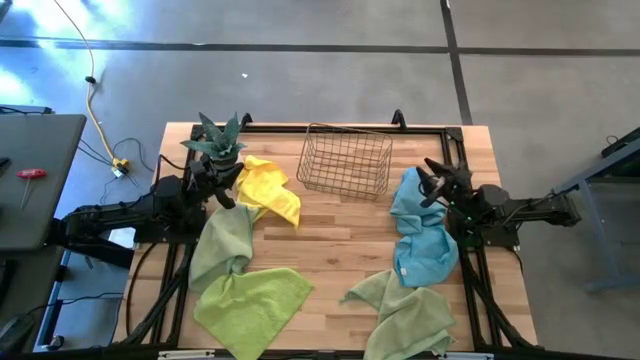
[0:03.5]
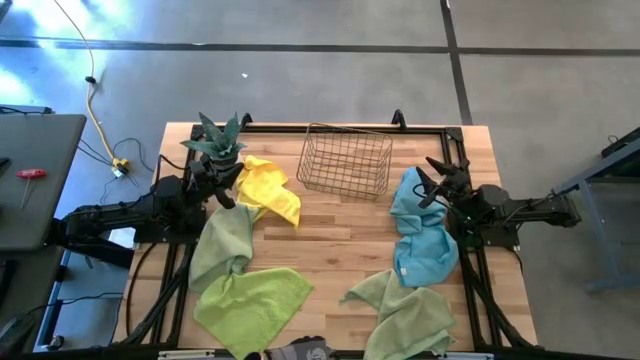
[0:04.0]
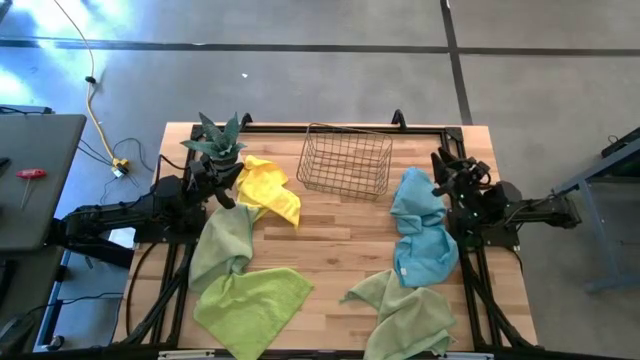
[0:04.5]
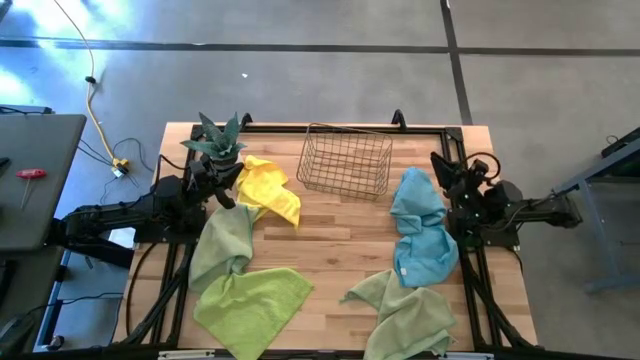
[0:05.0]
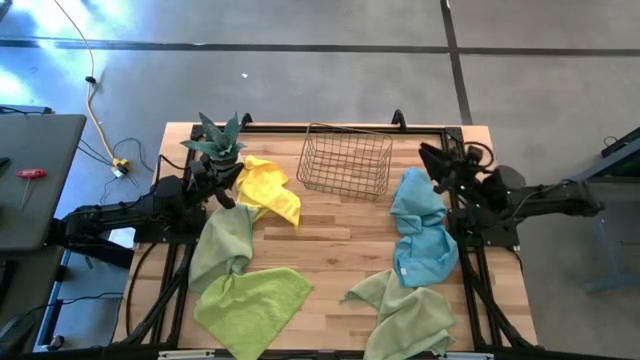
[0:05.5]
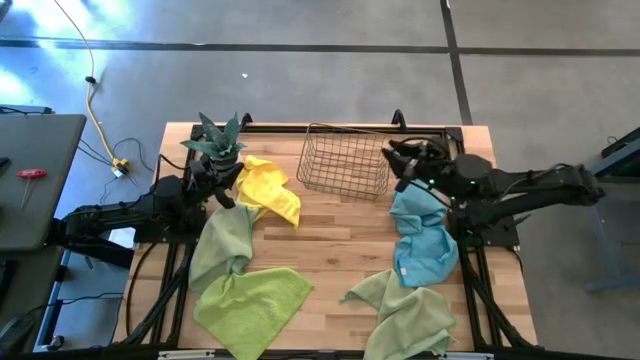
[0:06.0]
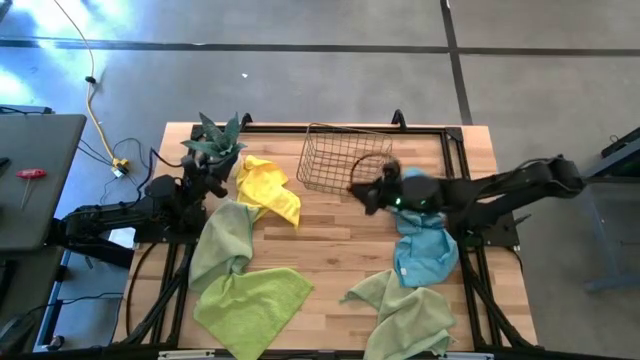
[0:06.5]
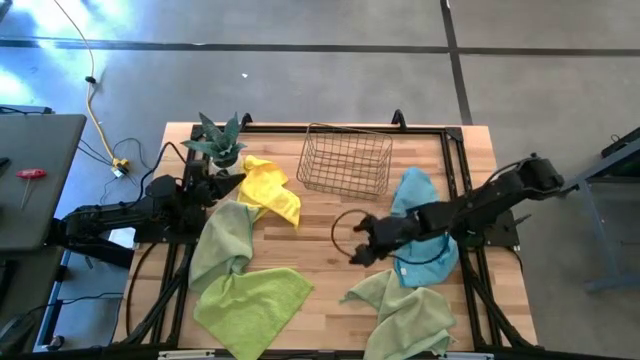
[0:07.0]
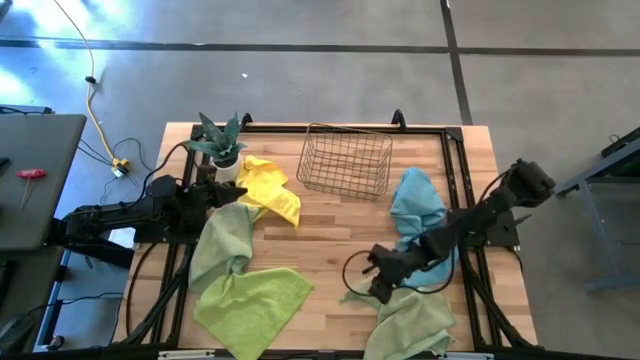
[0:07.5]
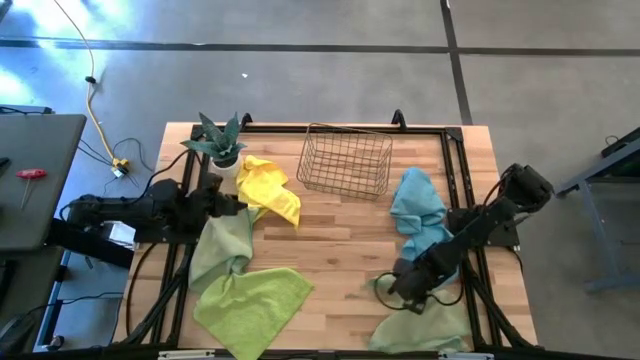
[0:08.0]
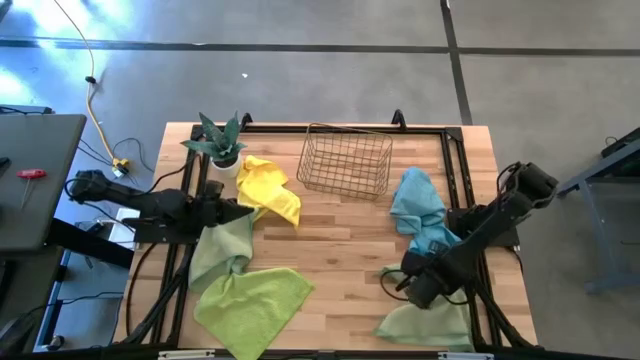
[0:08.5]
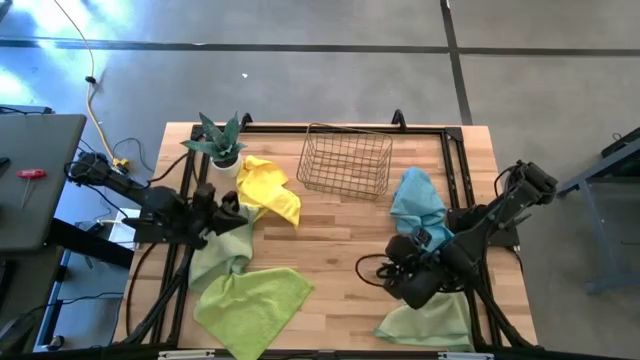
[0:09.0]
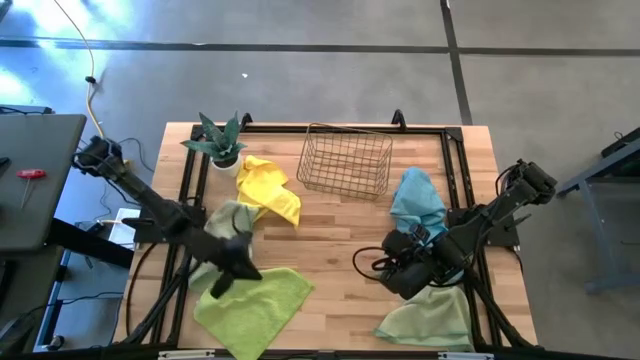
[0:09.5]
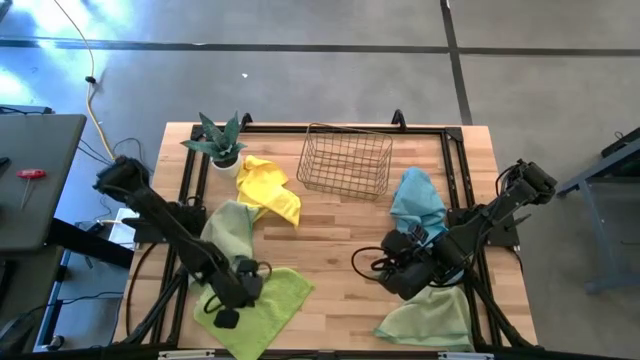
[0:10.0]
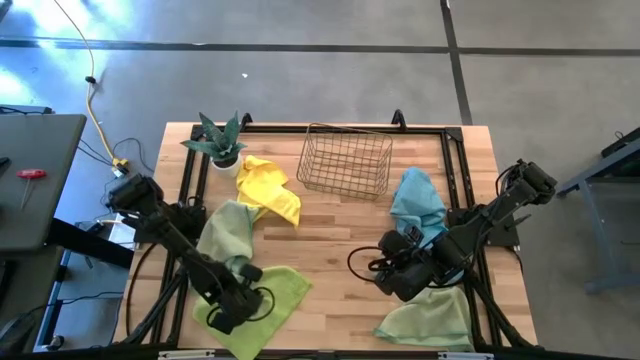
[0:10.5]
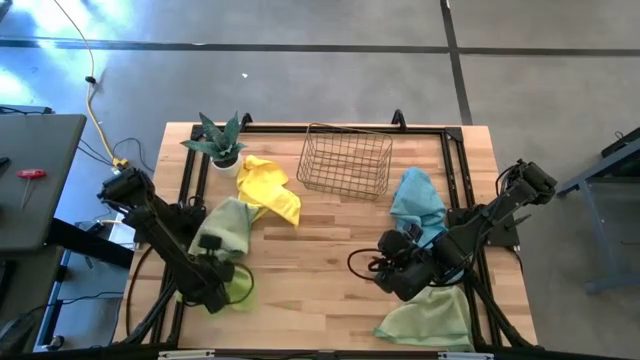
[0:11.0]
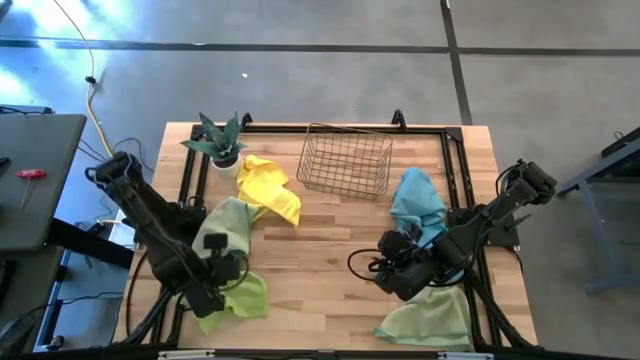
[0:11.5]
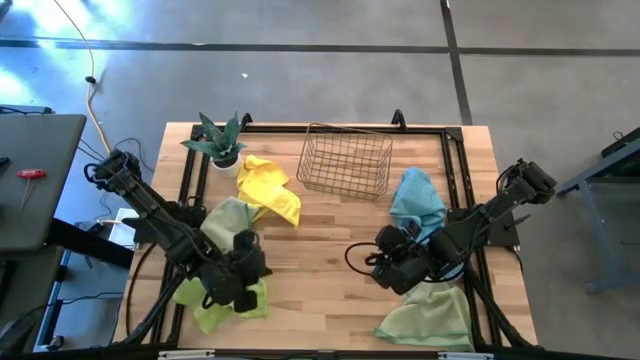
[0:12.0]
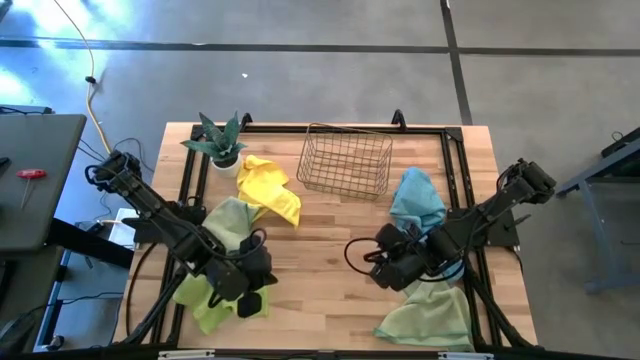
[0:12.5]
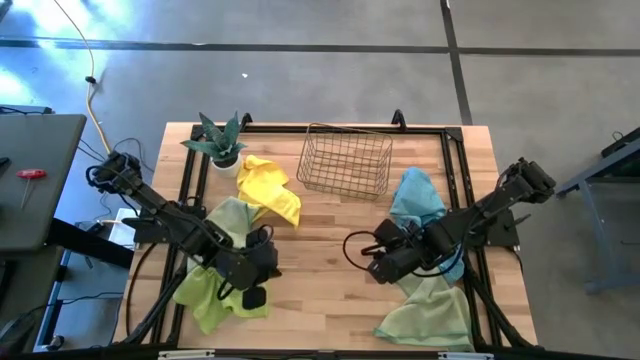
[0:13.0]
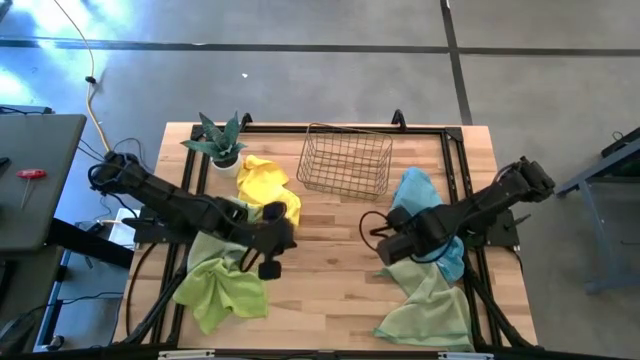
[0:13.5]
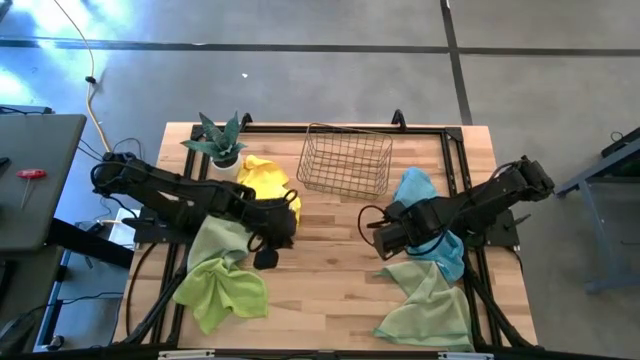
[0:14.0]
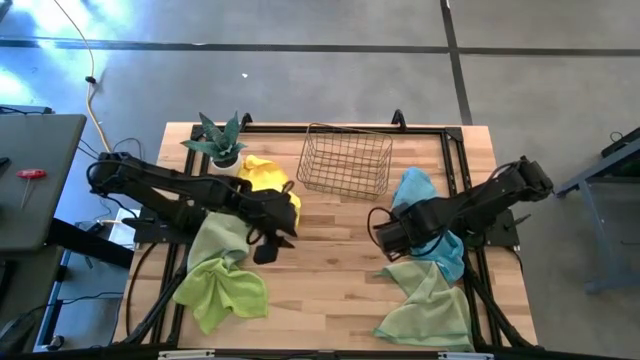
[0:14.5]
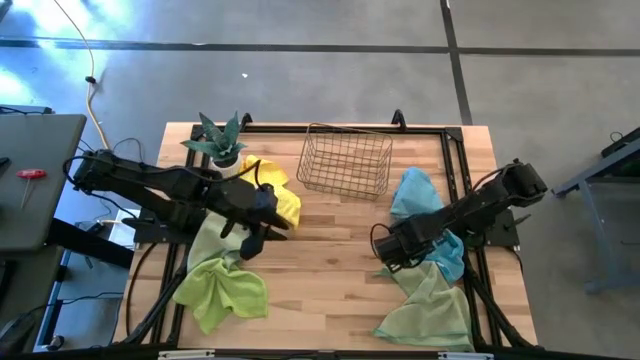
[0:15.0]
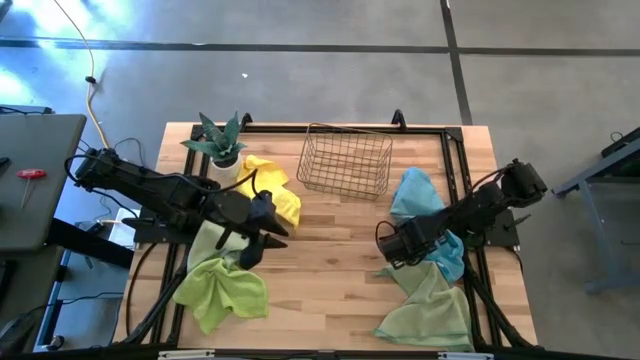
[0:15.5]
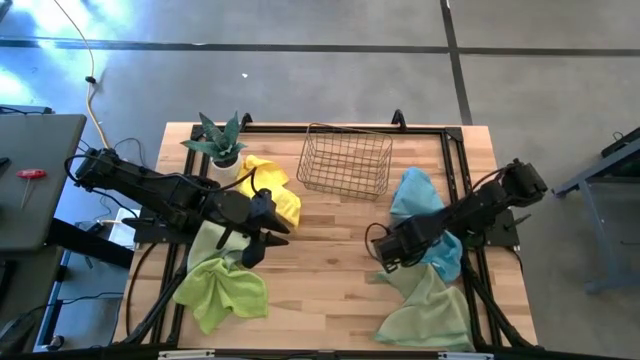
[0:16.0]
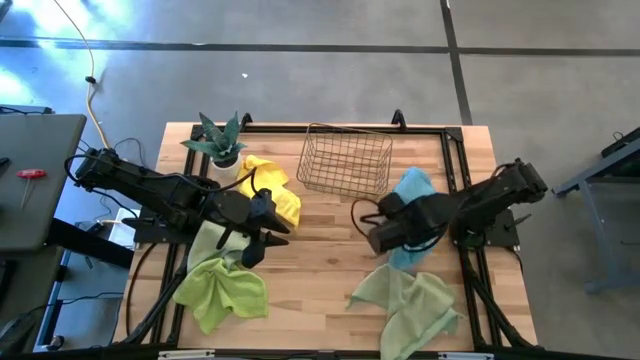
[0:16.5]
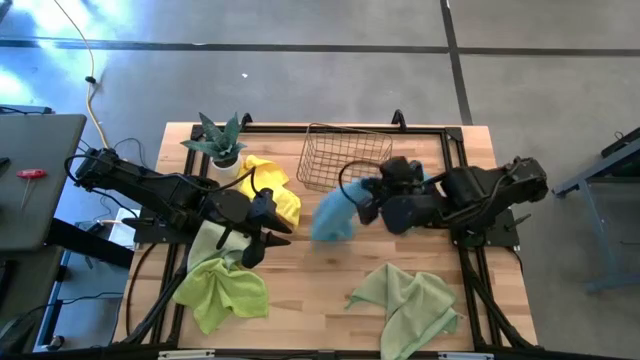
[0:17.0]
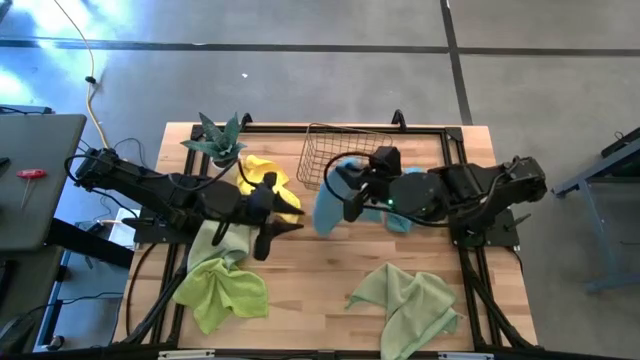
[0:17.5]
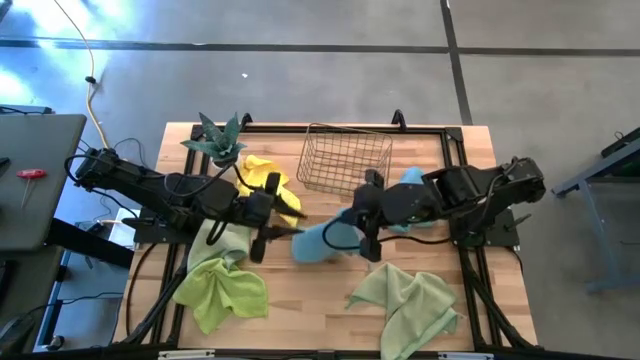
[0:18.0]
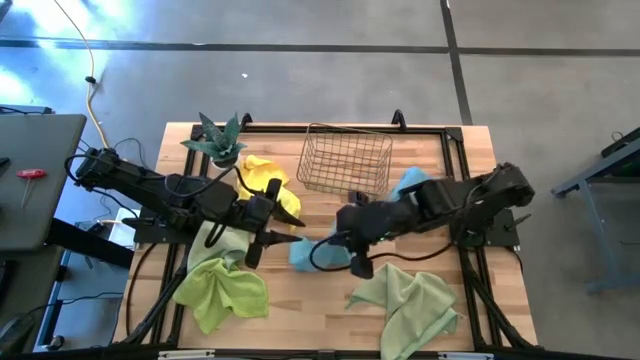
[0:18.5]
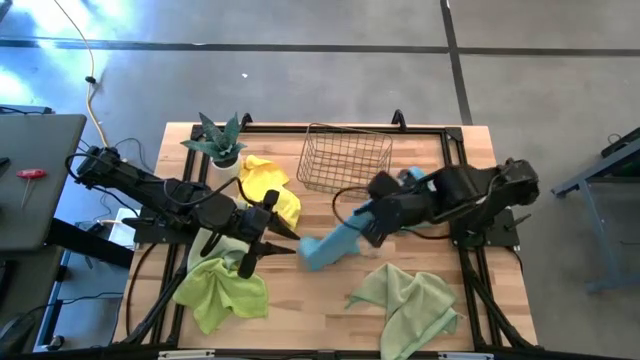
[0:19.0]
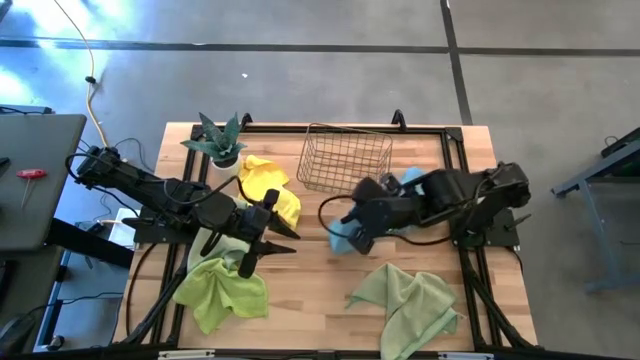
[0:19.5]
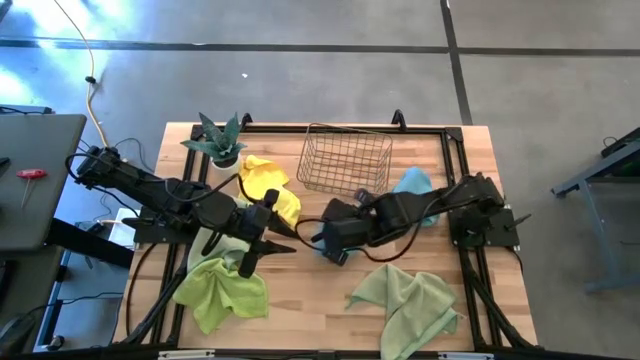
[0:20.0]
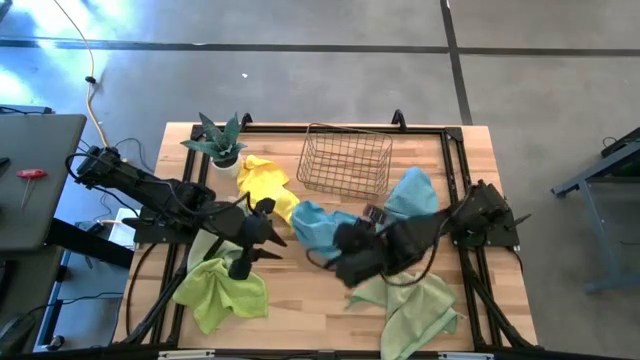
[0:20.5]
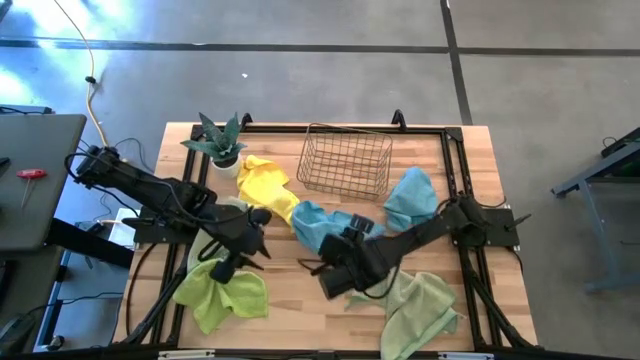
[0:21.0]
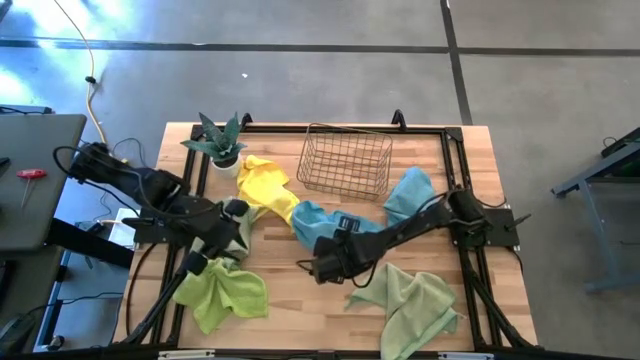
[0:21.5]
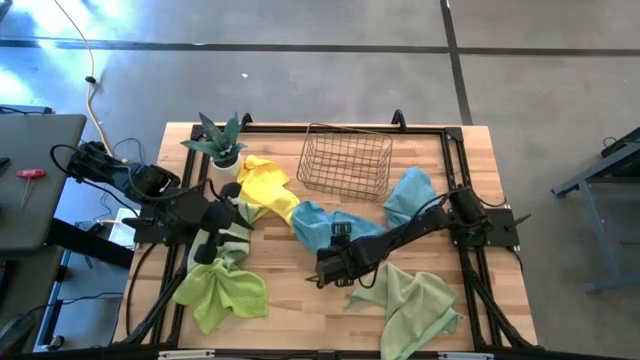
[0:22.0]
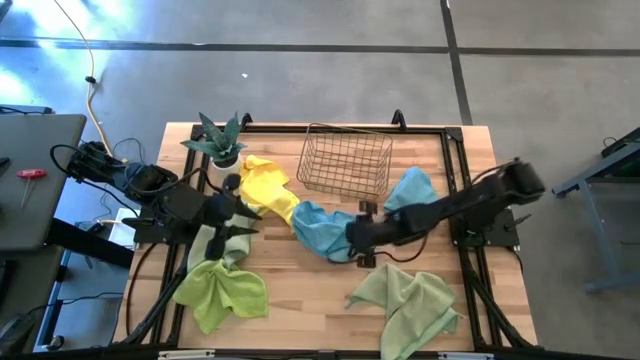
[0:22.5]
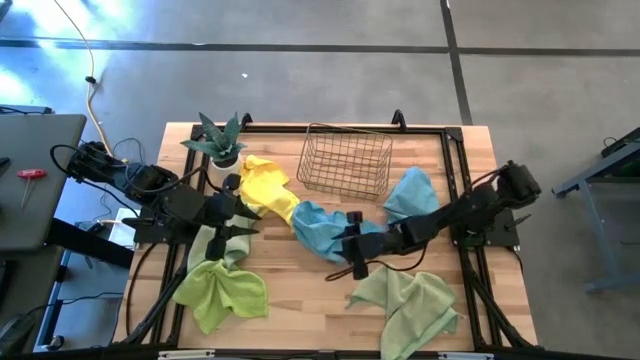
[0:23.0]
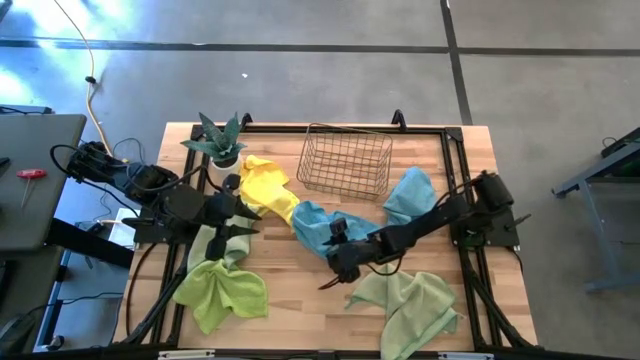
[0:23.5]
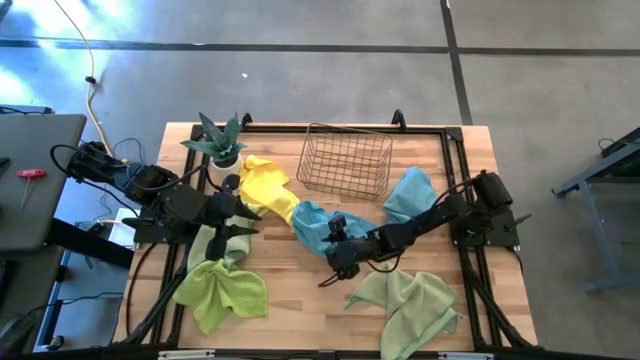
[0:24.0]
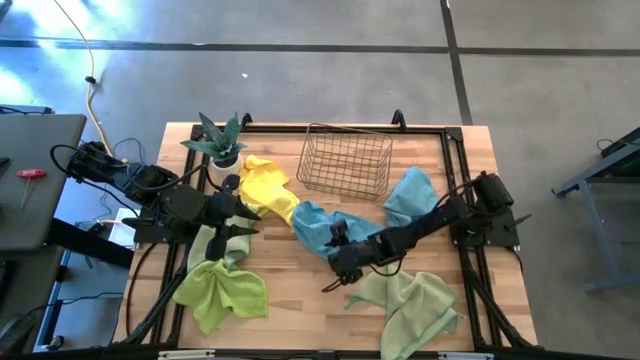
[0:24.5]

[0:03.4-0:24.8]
Task: Fold microfiber towels
Fold the bottom blue microfiber cloth
